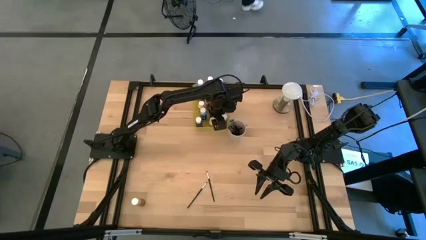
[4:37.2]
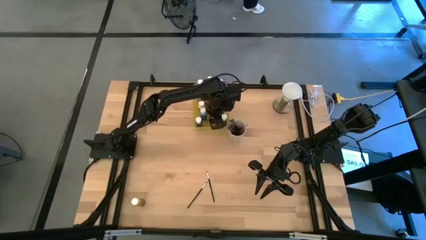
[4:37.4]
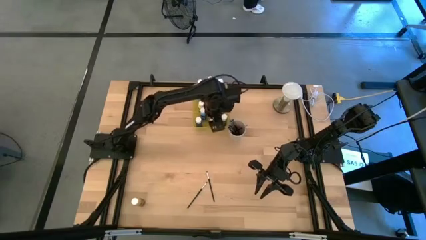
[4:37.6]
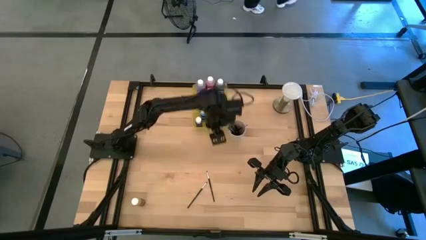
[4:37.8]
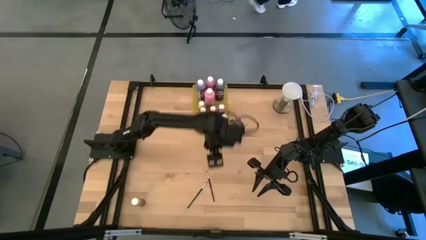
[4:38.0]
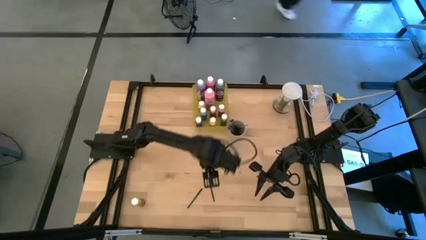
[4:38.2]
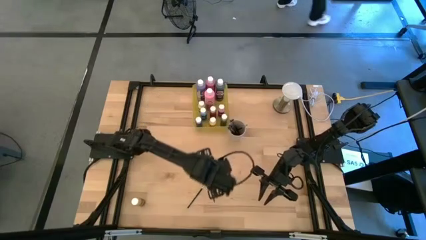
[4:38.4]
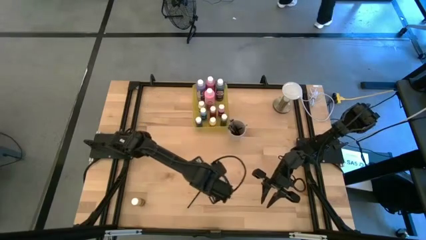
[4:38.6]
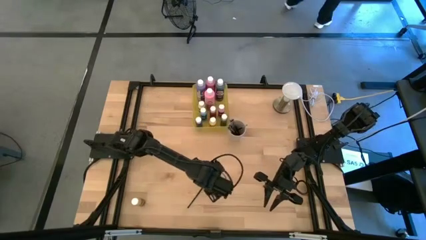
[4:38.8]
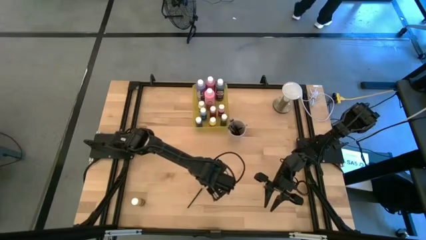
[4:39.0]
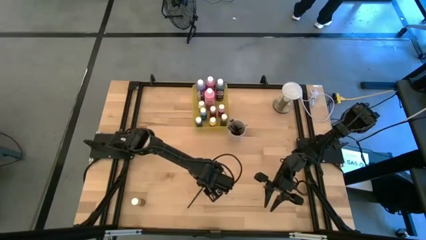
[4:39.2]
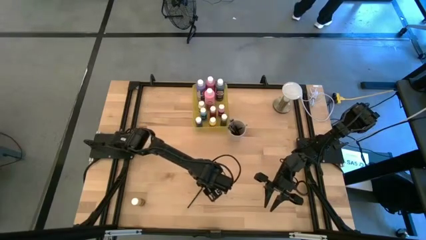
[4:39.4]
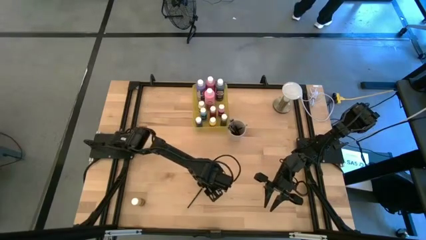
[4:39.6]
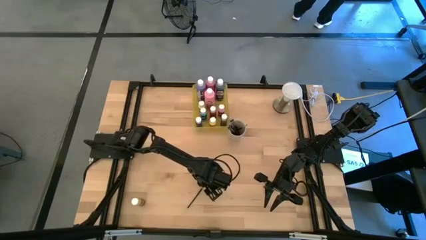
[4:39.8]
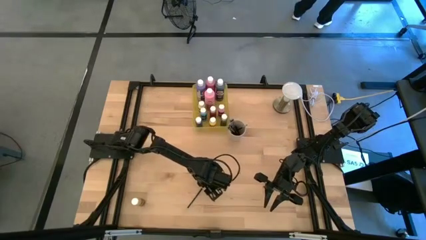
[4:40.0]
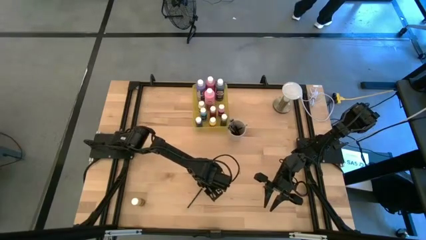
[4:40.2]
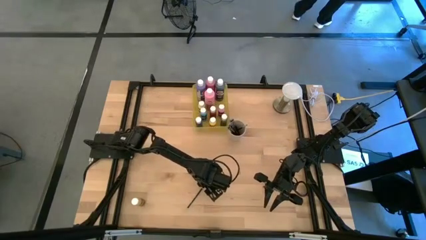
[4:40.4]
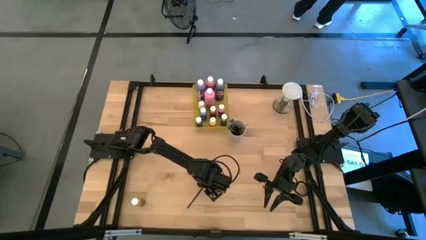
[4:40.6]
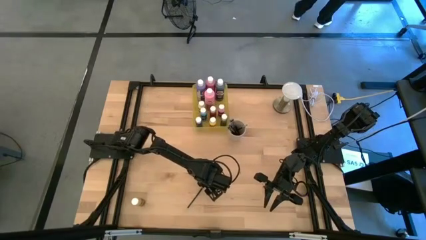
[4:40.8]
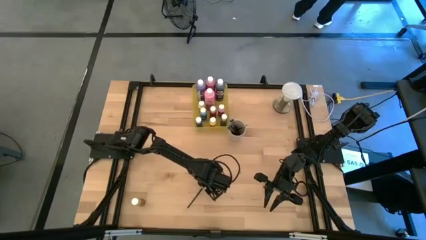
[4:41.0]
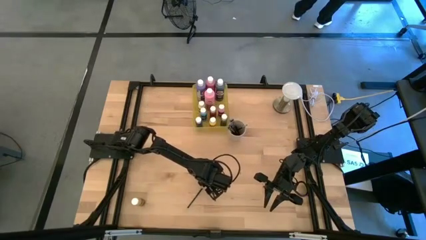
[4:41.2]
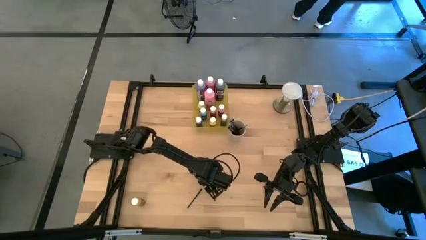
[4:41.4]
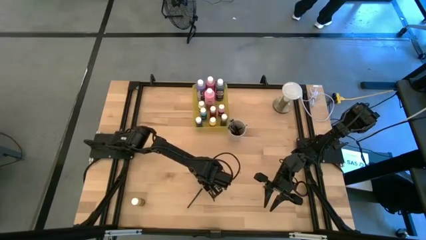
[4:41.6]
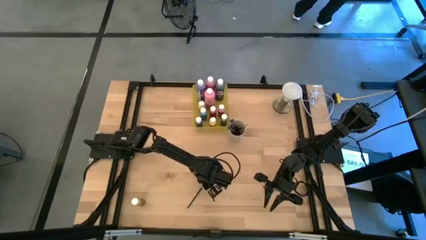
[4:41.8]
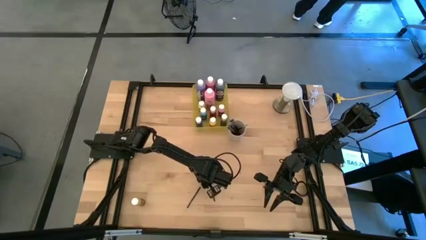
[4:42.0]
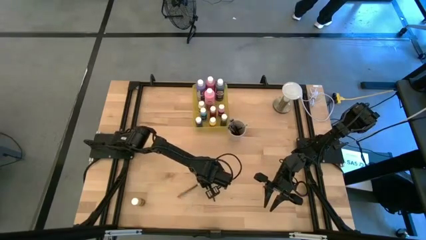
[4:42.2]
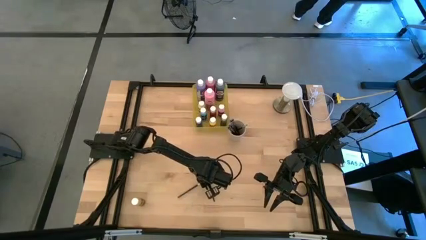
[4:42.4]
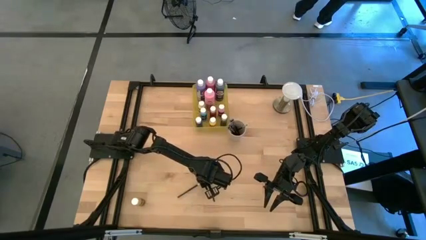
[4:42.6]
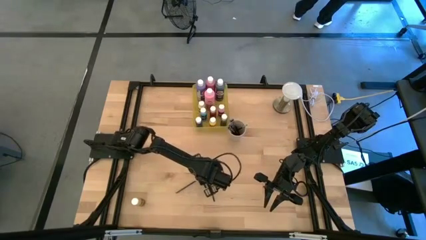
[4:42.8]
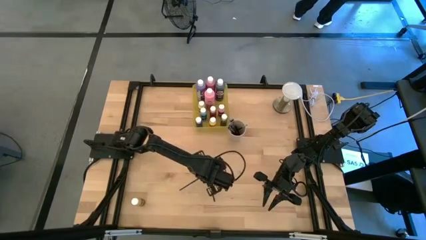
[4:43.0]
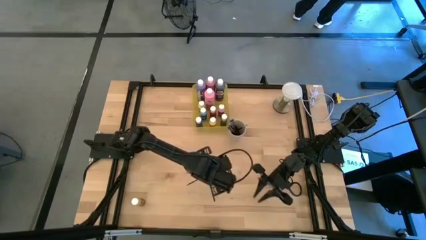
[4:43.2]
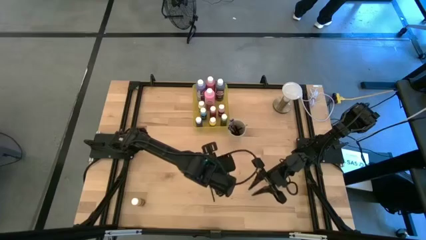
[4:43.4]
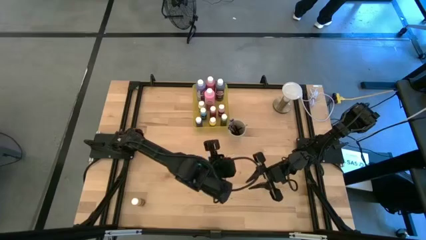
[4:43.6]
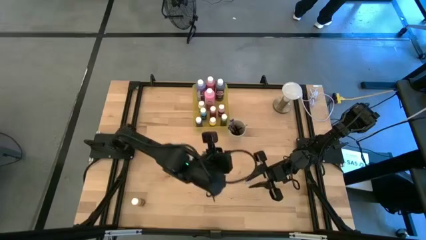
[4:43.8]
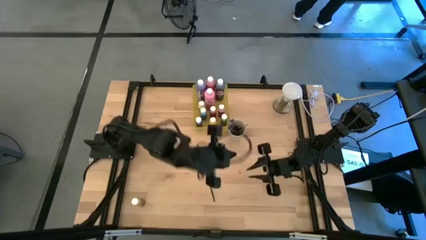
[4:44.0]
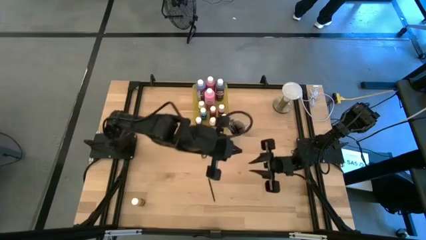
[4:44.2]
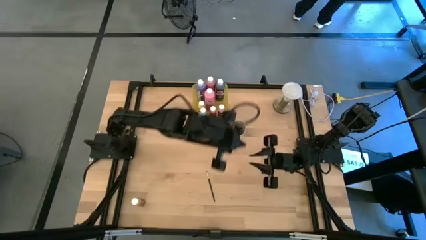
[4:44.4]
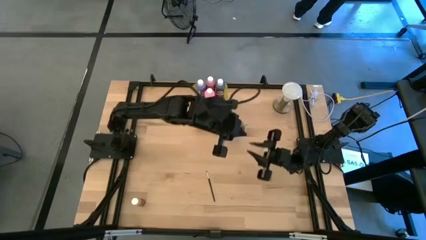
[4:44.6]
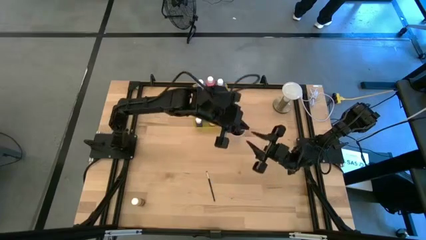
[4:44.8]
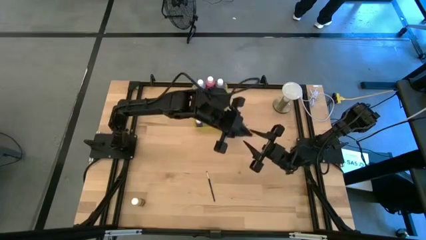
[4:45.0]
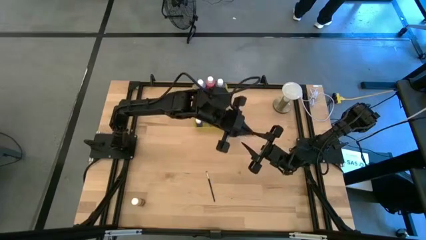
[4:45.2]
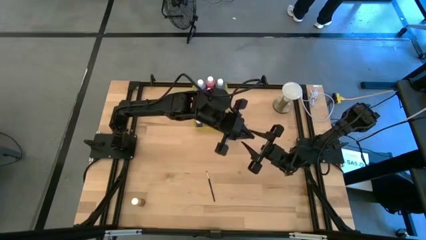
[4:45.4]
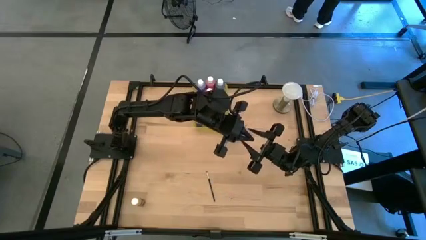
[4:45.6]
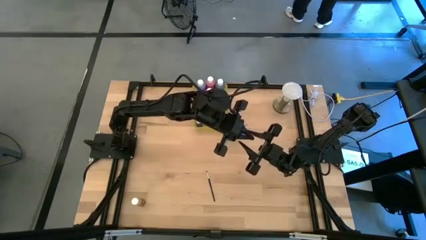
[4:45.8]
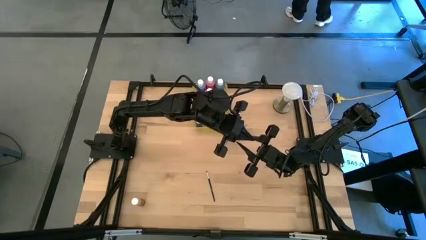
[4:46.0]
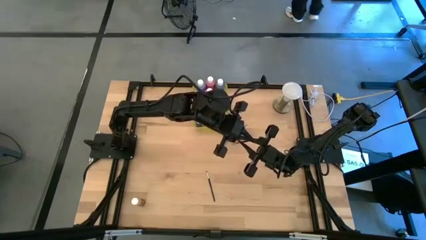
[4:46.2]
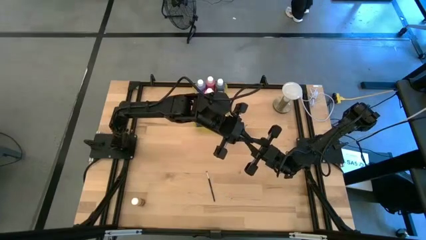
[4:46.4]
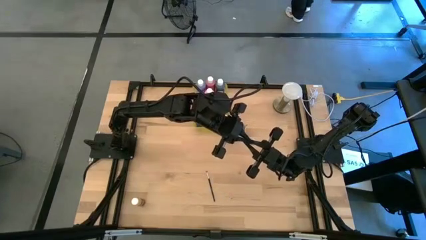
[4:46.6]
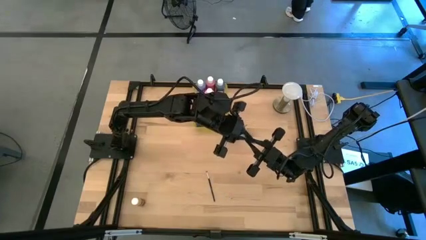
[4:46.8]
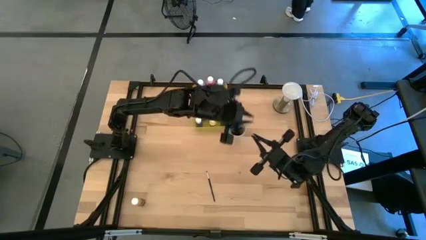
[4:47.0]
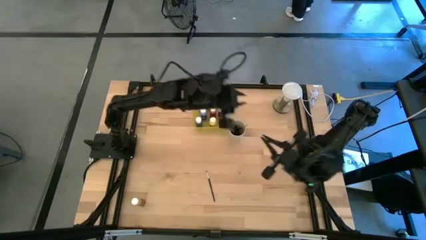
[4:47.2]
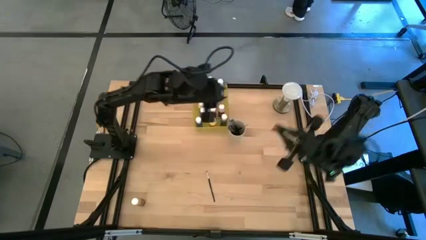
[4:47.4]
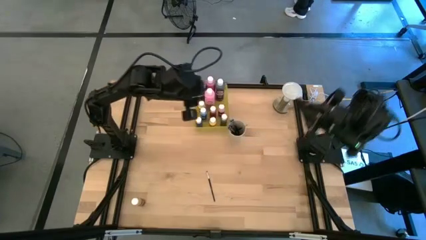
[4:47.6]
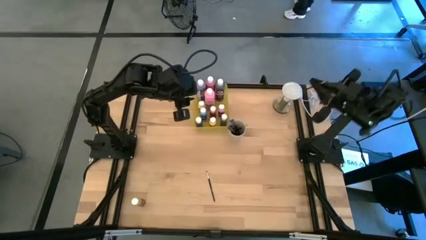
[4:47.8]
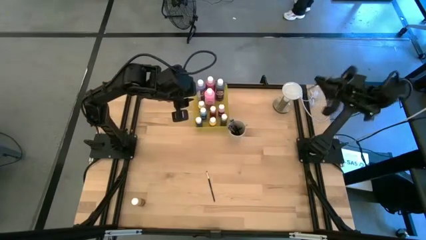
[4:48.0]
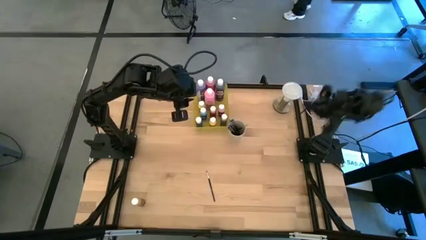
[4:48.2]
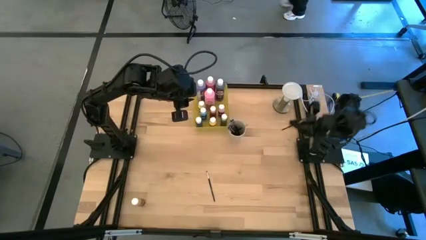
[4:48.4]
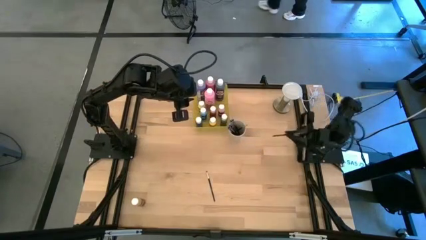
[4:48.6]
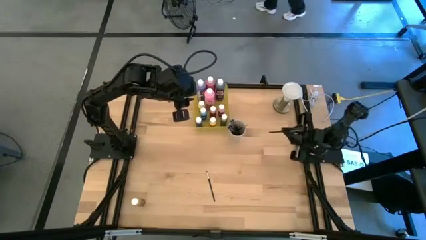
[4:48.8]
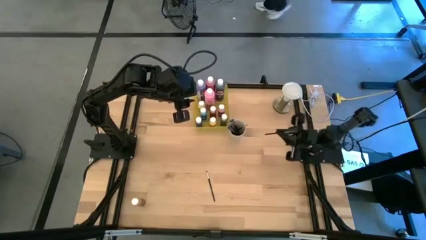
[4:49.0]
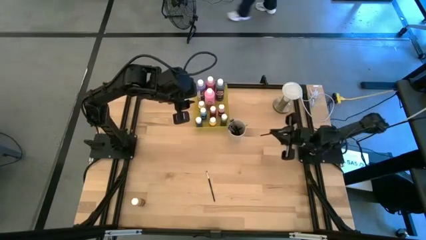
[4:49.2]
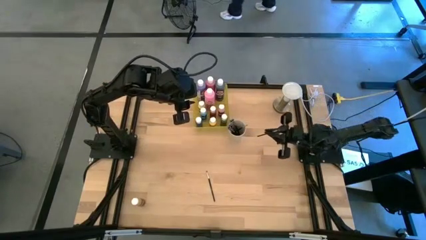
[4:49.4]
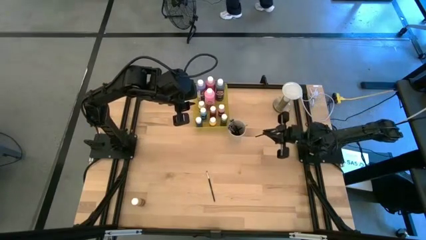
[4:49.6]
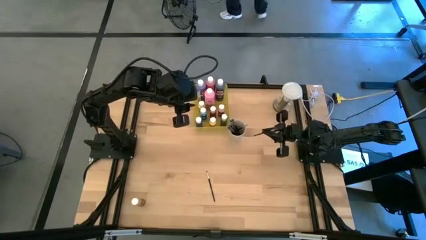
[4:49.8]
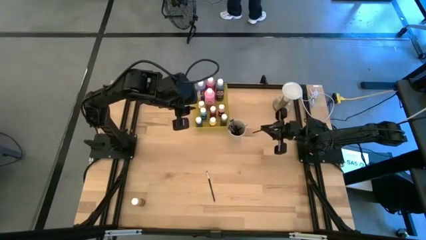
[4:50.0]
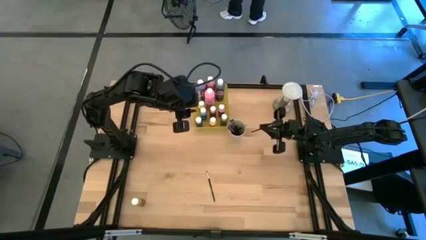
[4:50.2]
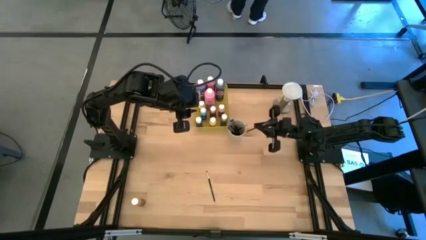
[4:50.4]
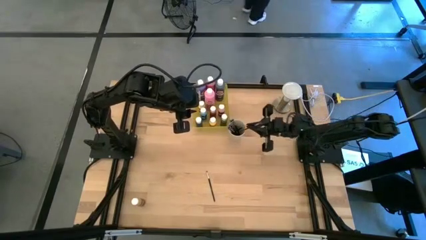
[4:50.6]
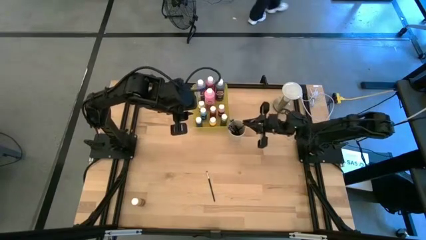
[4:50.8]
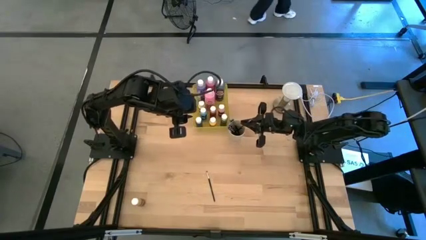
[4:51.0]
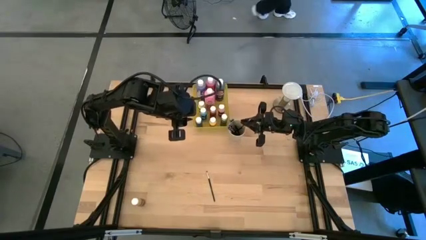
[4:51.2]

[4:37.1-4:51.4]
Task: Pick & Place Paint Supplies
Put the black paintbrush into the white cup

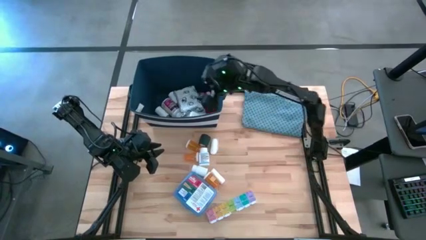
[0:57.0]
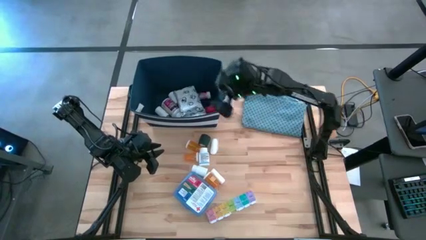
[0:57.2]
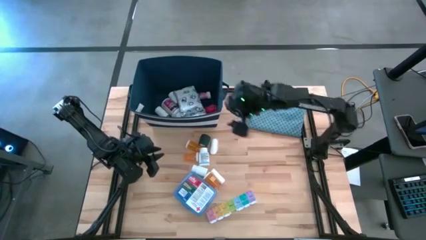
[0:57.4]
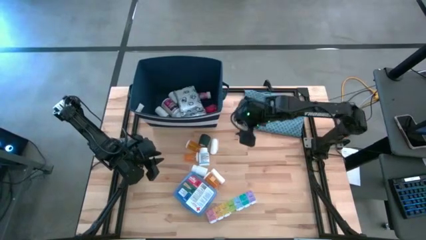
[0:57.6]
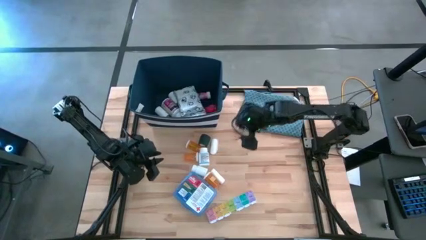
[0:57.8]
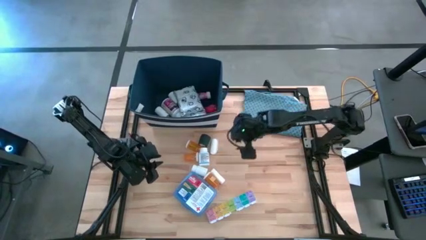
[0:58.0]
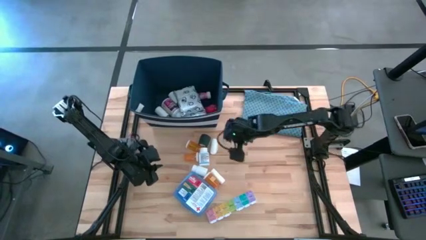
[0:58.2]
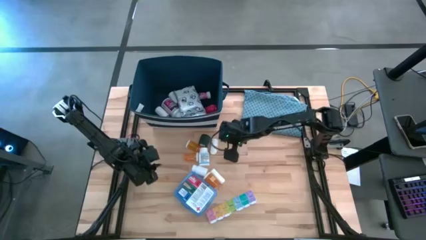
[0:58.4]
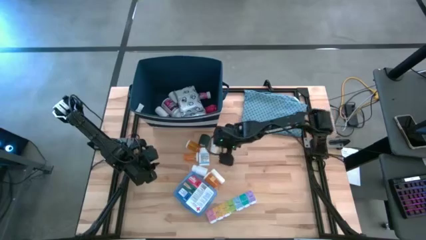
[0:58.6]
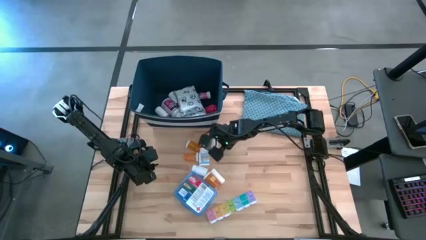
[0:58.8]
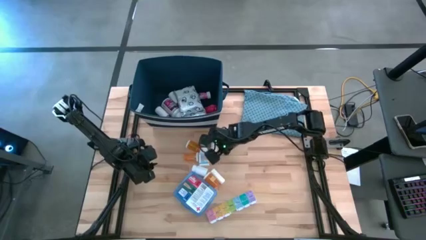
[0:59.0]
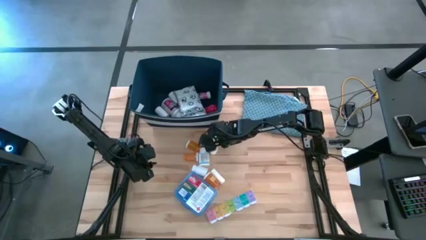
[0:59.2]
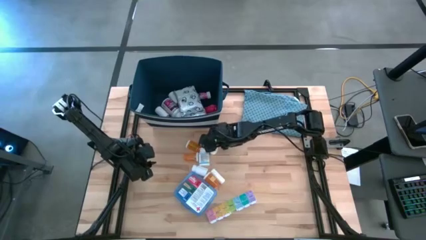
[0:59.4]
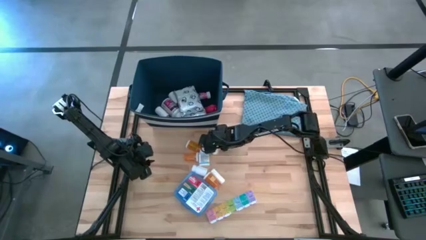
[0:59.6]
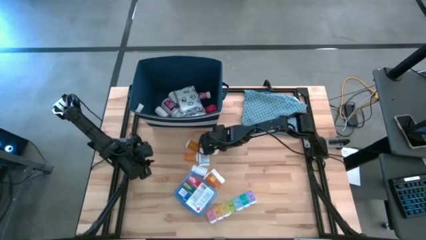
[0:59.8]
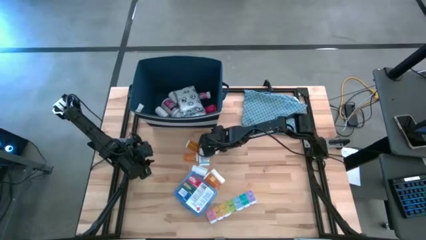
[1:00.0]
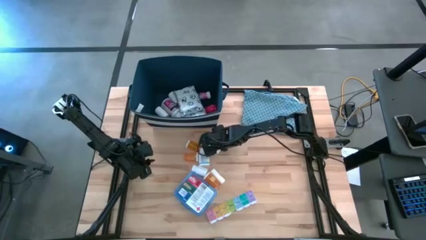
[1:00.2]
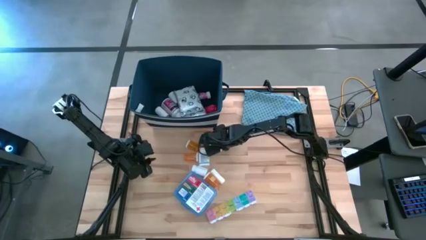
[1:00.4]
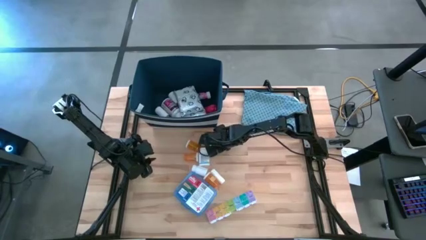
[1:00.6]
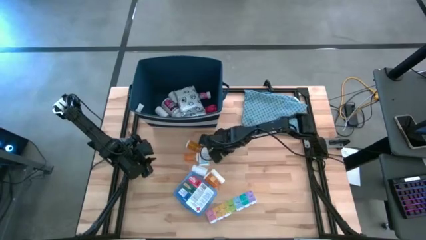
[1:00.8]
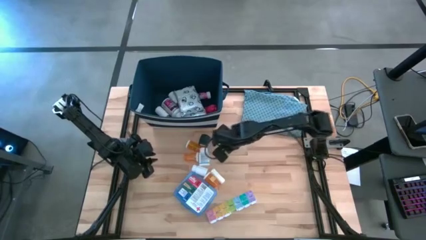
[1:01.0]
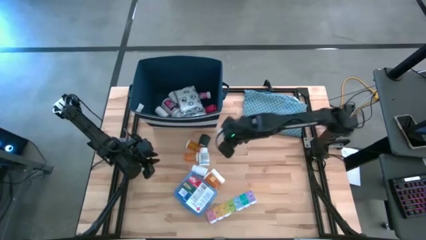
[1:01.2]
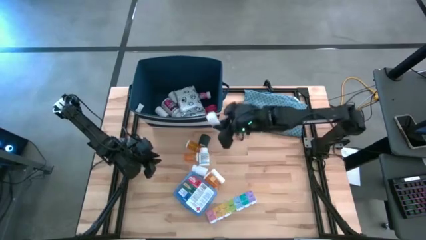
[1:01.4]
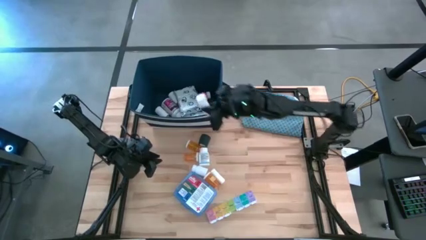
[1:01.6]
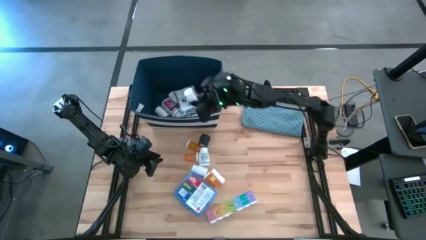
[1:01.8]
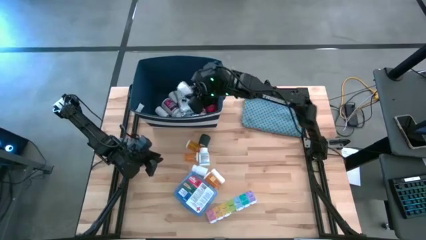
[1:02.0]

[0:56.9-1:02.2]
Task: Pick & place medical supplies in basket/bin
Put the white bandage into the blue bin
